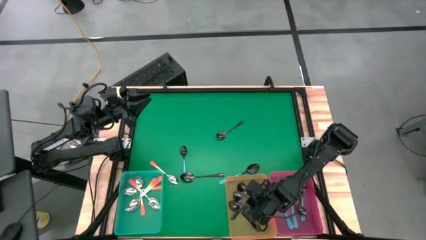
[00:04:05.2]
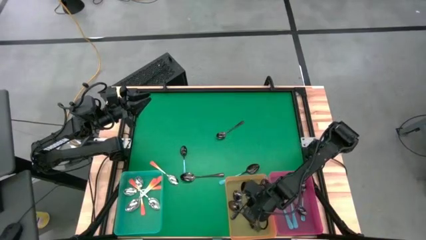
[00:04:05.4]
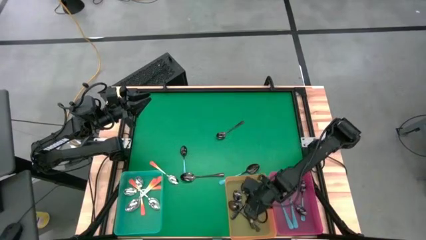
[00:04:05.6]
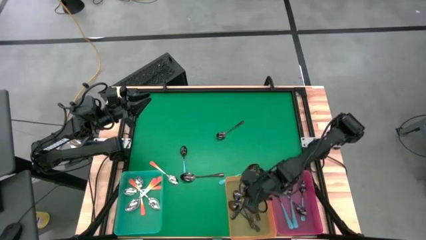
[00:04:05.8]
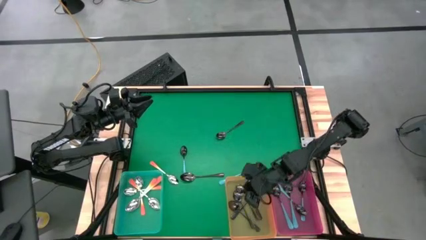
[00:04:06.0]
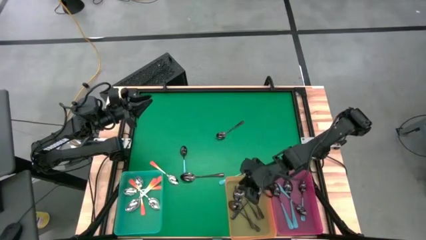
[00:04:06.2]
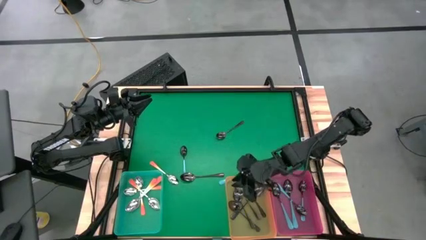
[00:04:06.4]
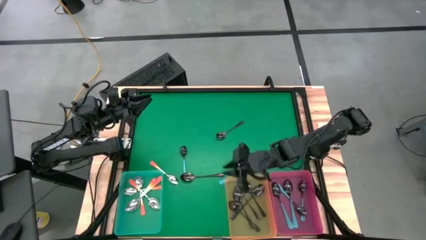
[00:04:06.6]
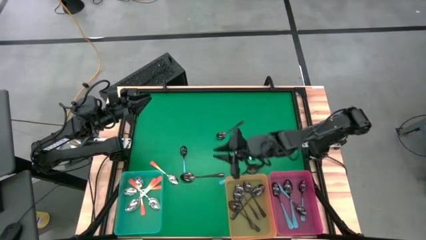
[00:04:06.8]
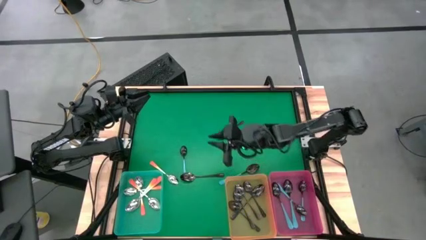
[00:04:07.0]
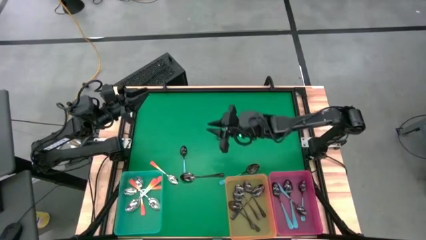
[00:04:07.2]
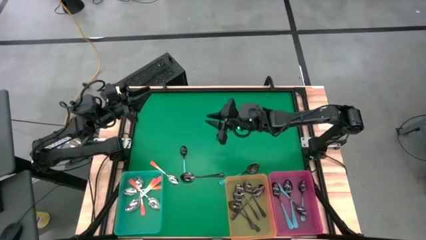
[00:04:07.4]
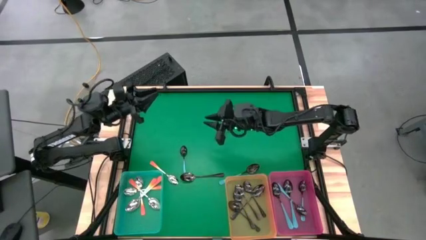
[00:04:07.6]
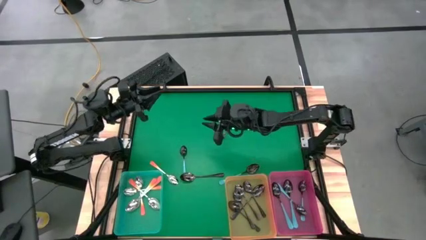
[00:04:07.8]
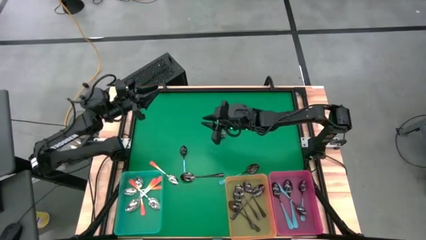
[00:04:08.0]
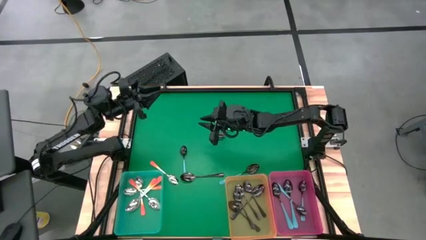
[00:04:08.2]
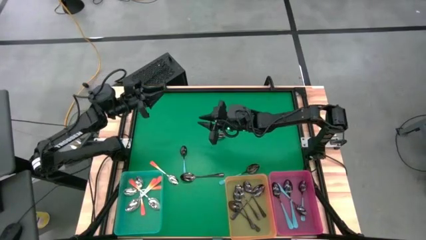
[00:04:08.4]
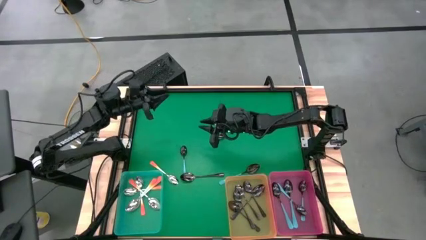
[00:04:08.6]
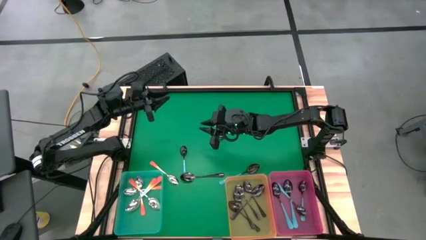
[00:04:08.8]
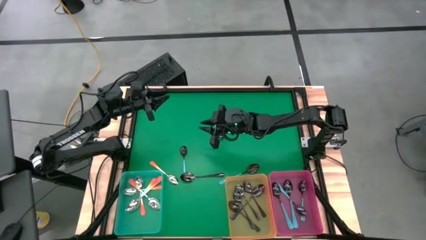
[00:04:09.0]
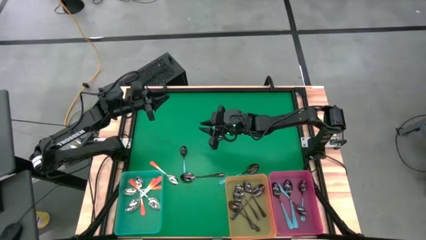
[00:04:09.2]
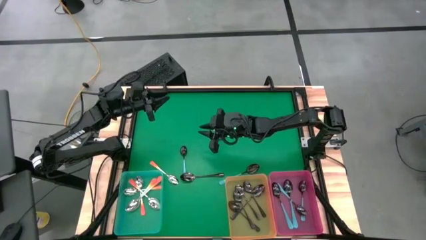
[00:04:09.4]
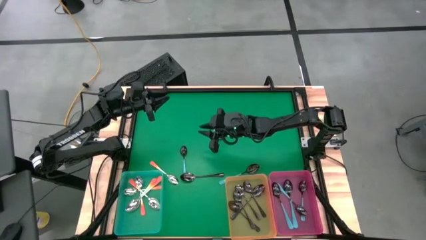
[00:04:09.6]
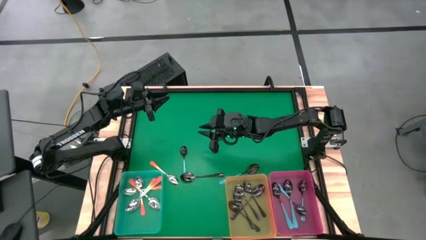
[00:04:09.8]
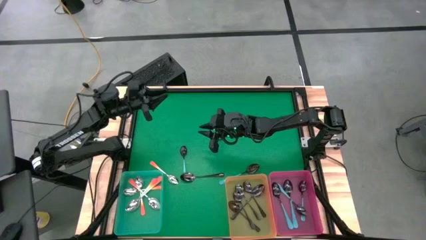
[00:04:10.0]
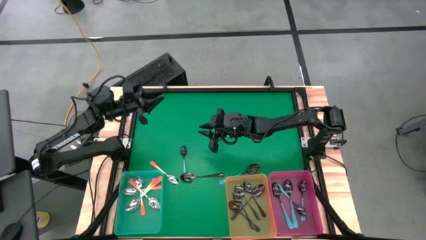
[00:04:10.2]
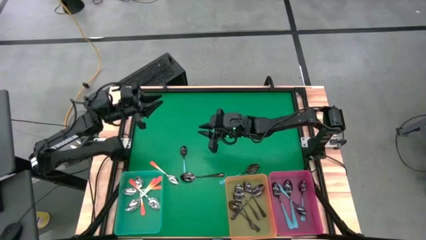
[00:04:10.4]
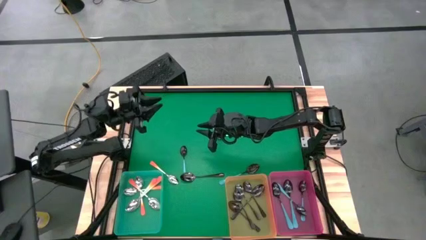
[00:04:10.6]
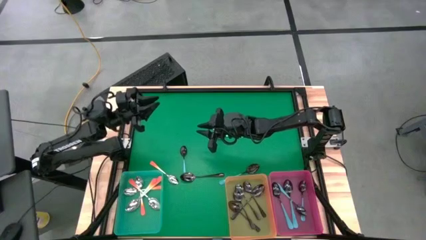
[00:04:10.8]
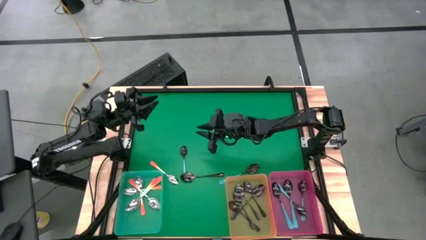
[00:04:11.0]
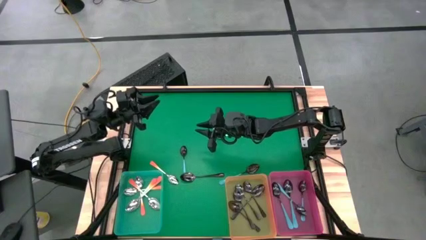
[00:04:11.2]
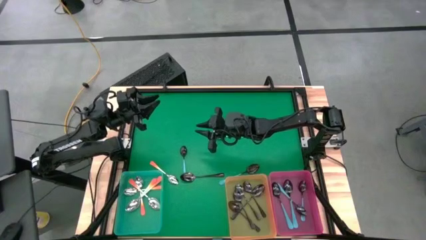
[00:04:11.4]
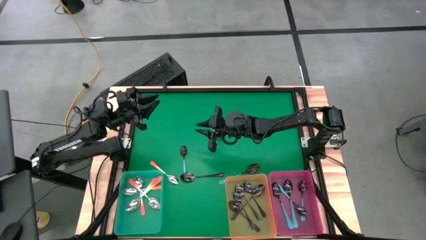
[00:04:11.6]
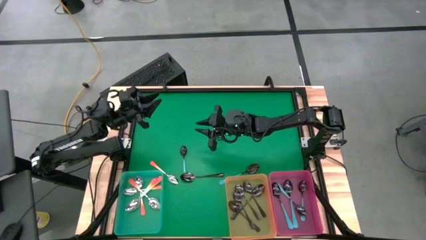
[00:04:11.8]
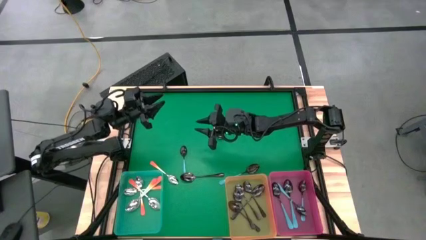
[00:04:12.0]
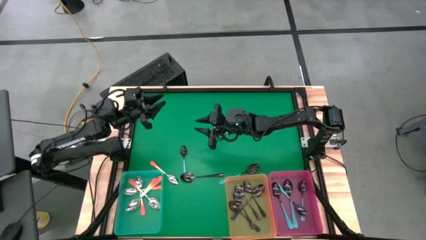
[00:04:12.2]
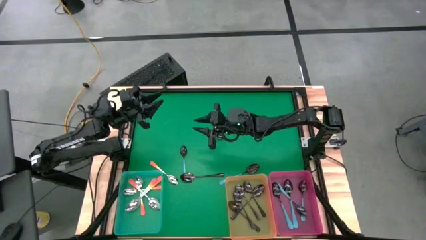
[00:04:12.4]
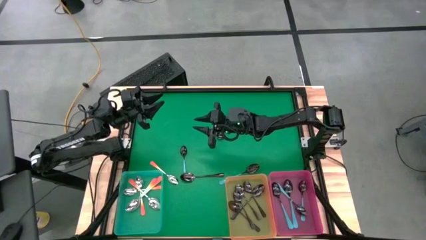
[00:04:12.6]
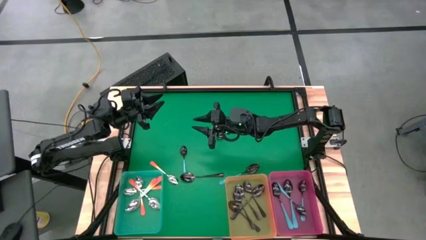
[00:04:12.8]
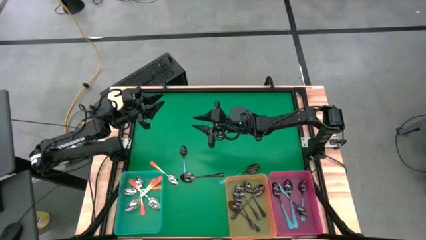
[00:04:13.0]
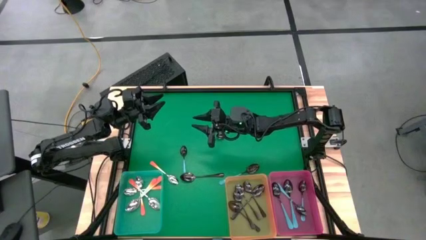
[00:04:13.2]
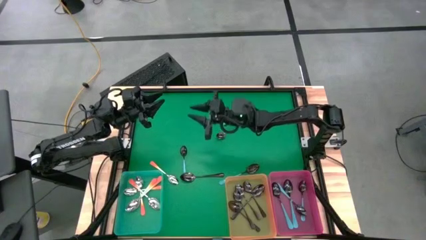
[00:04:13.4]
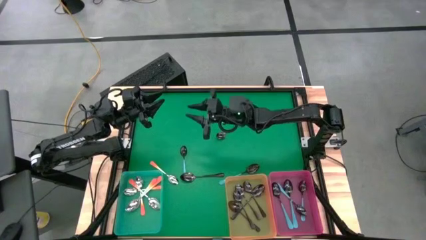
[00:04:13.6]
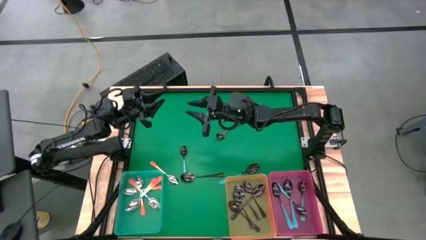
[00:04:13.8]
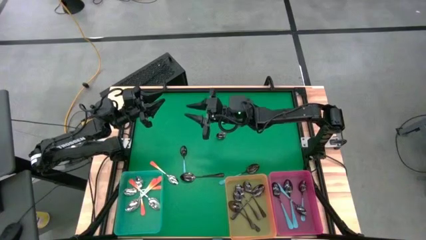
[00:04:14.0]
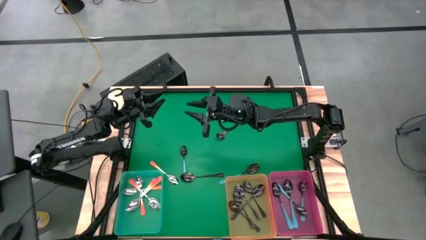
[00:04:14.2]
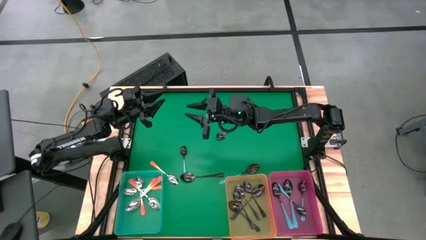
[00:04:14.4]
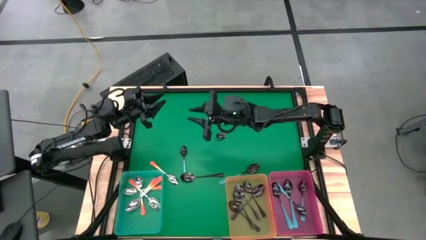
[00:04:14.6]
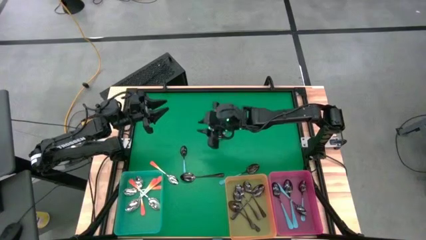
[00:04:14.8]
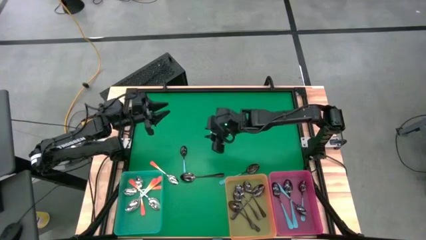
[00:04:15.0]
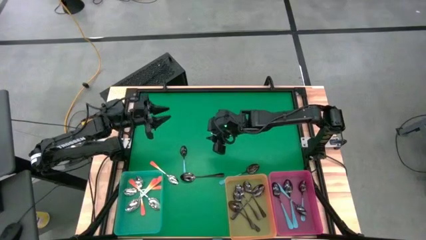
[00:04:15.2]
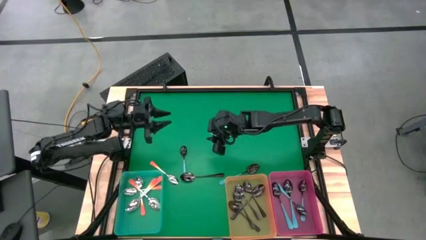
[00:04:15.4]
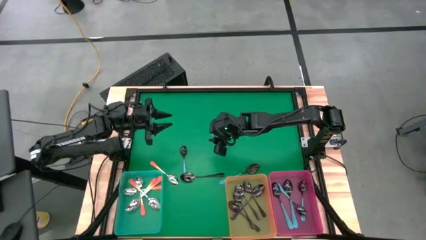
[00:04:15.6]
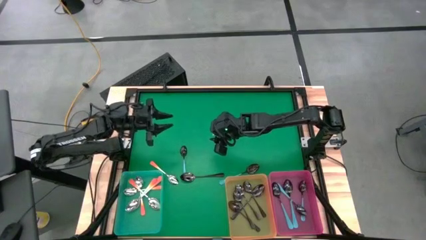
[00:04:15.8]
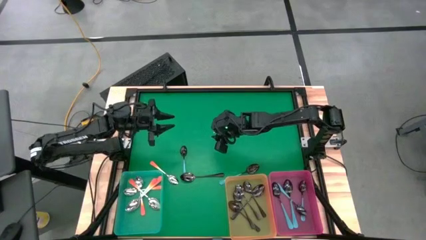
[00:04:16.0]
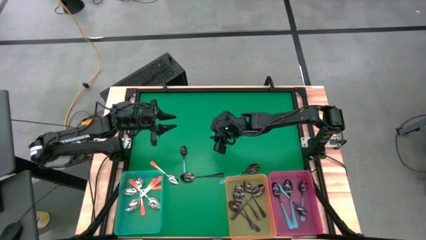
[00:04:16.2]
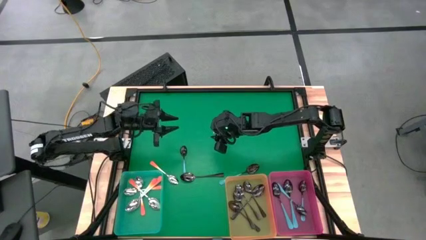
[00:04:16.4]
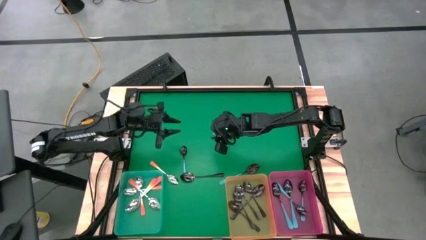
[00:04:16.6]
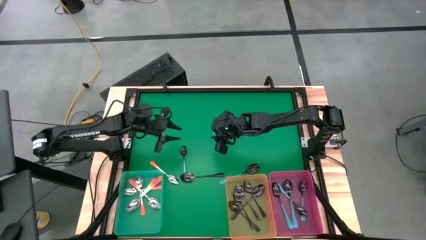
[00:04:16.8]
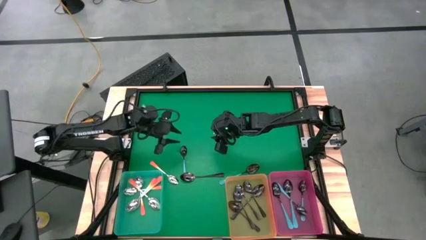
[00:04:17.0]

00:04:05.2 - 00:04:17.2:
Task: Sort silverware by color (type)
Put the black spoon into the orange bin
